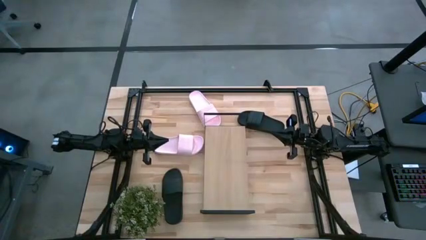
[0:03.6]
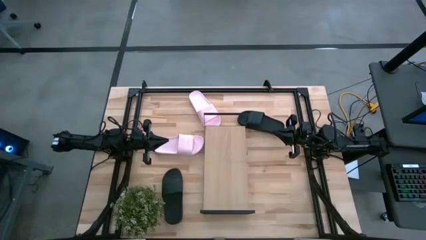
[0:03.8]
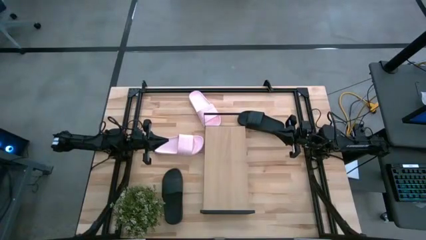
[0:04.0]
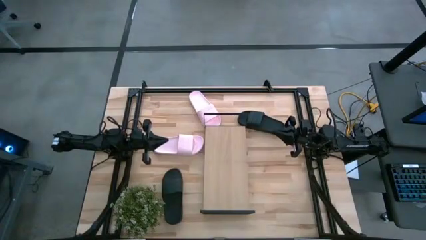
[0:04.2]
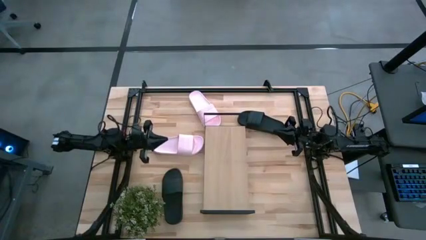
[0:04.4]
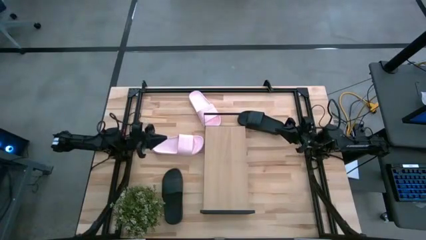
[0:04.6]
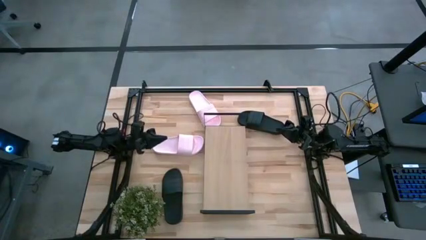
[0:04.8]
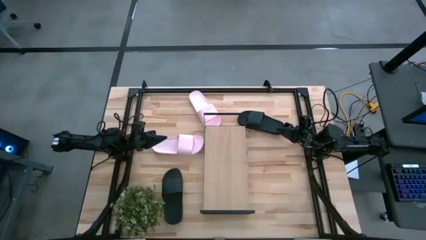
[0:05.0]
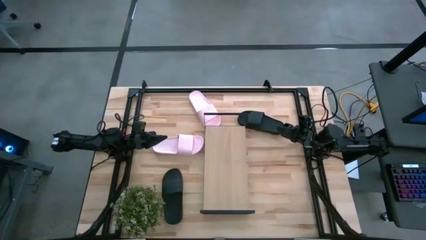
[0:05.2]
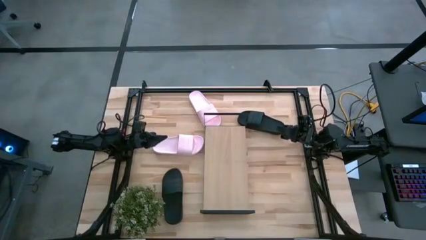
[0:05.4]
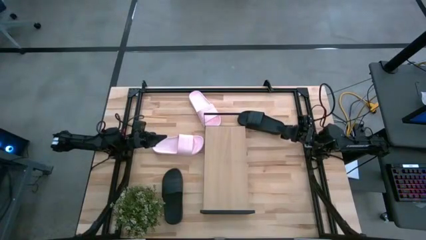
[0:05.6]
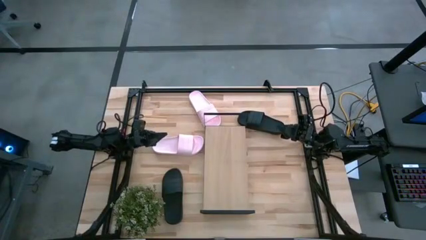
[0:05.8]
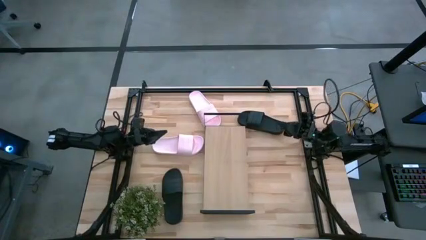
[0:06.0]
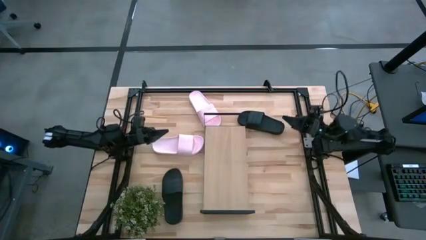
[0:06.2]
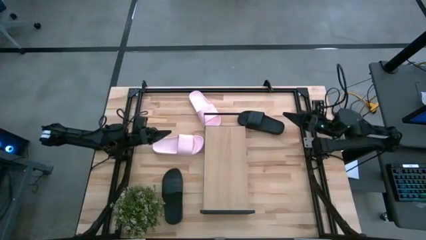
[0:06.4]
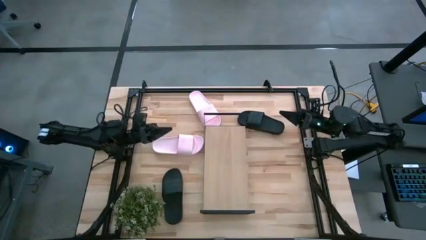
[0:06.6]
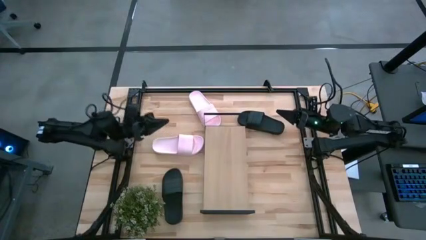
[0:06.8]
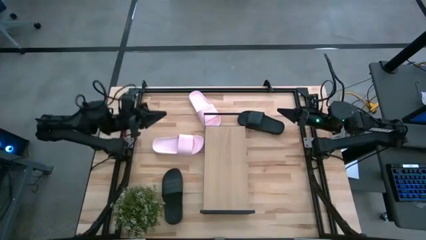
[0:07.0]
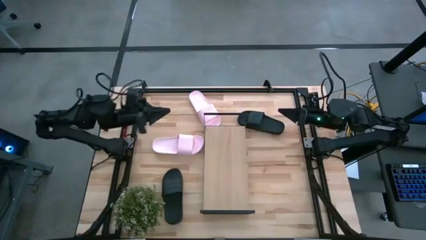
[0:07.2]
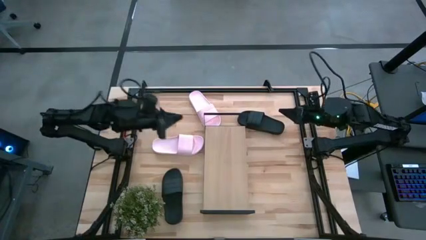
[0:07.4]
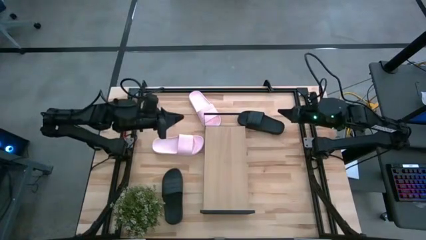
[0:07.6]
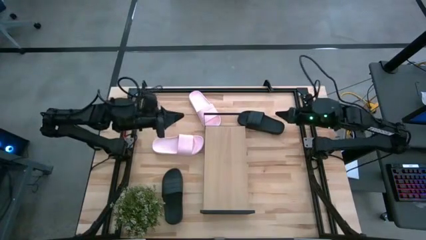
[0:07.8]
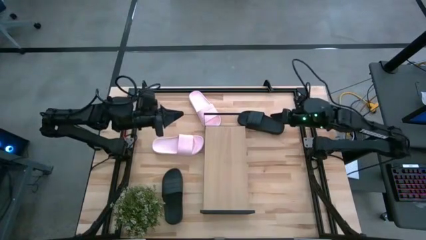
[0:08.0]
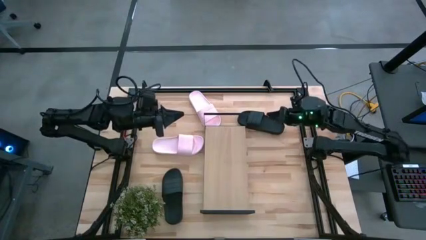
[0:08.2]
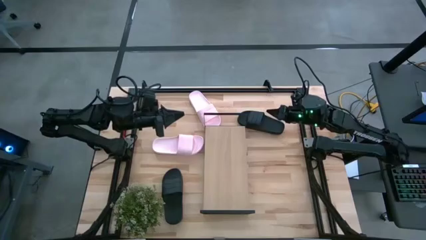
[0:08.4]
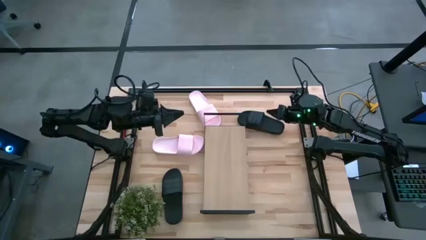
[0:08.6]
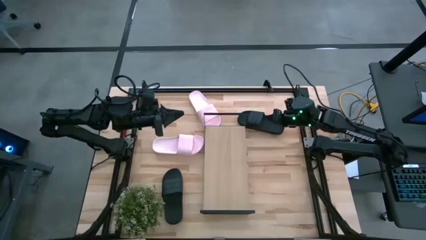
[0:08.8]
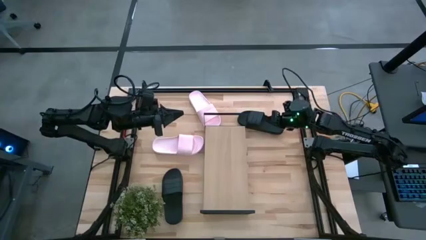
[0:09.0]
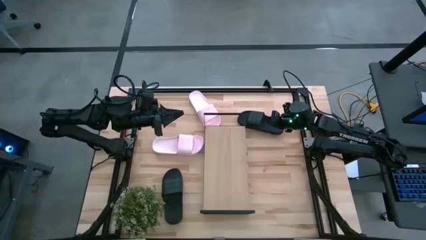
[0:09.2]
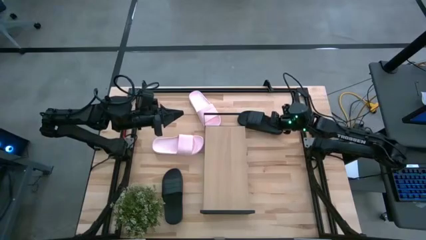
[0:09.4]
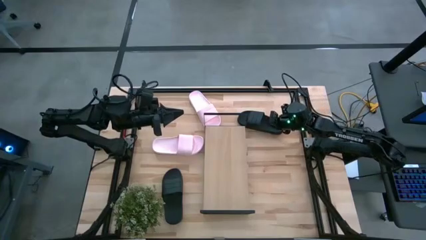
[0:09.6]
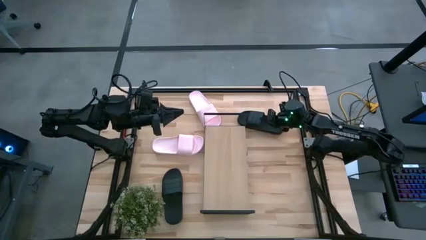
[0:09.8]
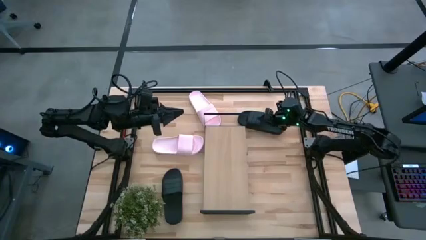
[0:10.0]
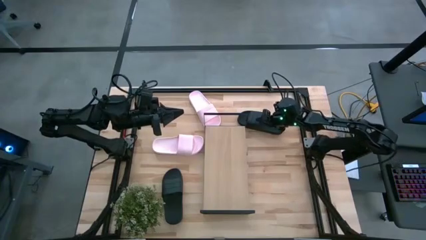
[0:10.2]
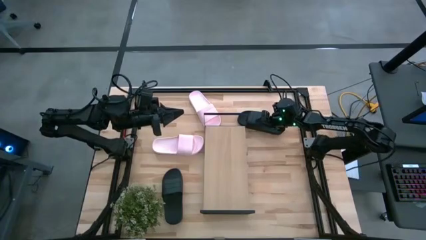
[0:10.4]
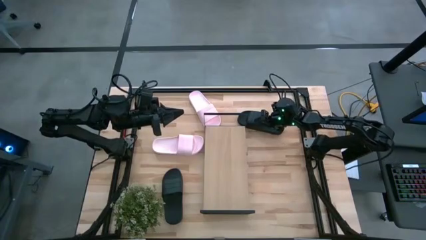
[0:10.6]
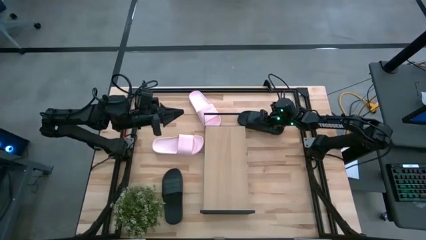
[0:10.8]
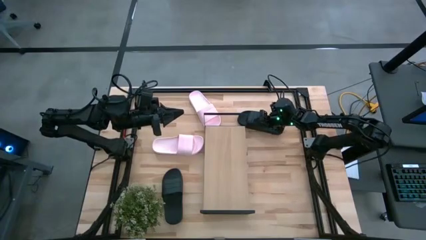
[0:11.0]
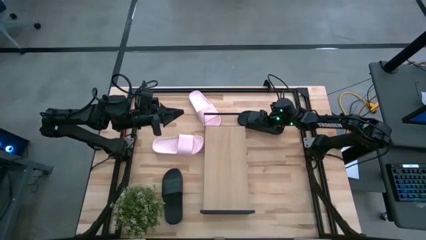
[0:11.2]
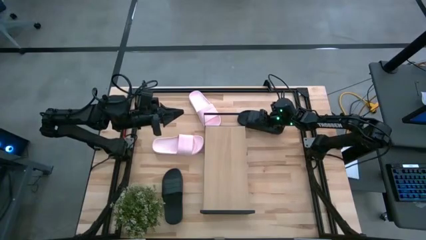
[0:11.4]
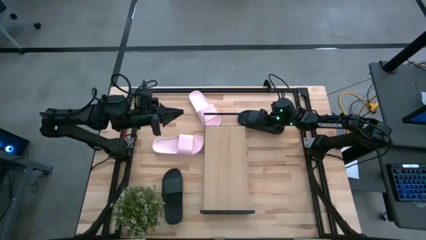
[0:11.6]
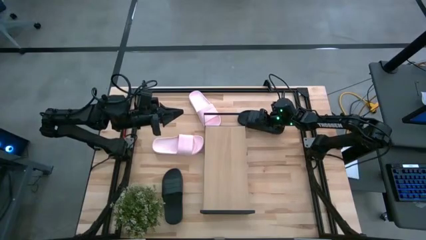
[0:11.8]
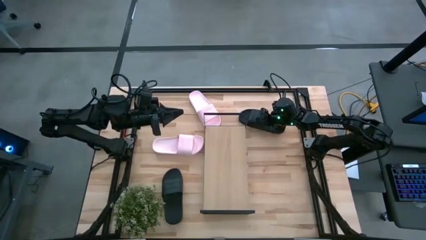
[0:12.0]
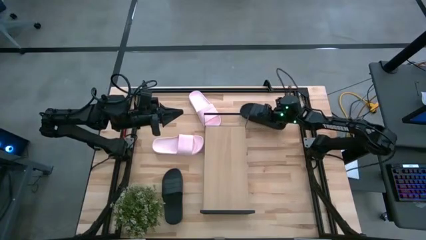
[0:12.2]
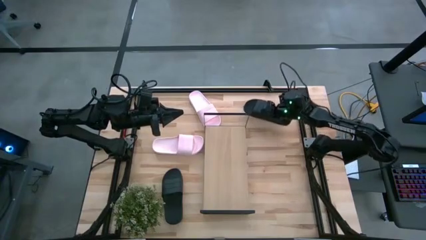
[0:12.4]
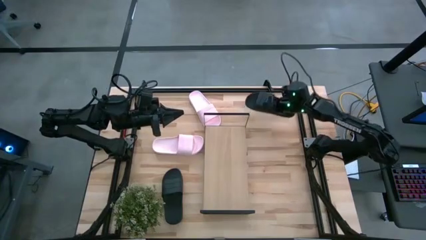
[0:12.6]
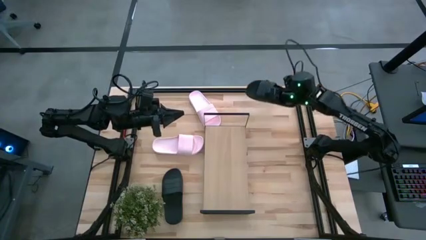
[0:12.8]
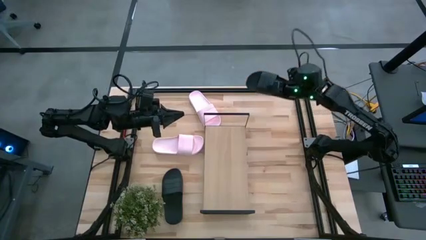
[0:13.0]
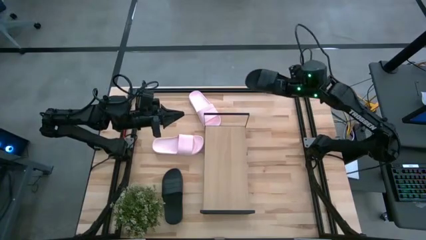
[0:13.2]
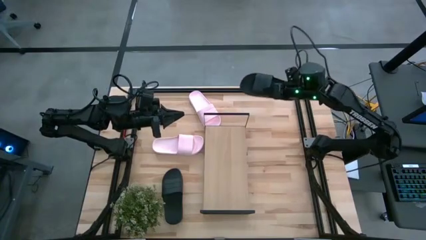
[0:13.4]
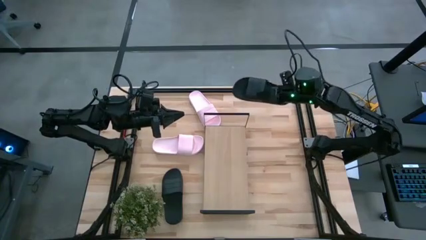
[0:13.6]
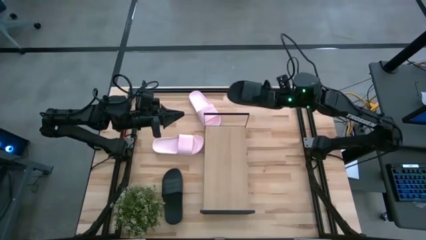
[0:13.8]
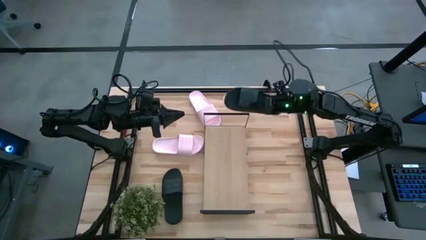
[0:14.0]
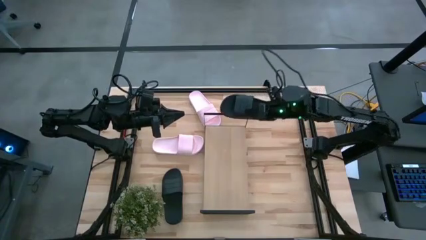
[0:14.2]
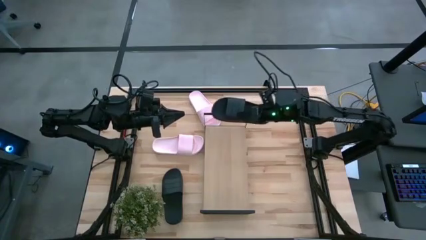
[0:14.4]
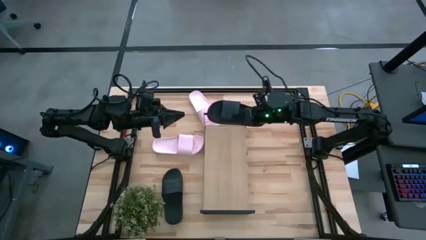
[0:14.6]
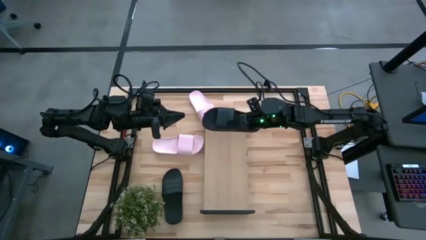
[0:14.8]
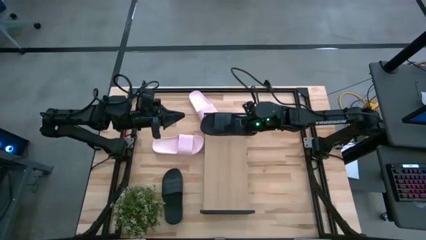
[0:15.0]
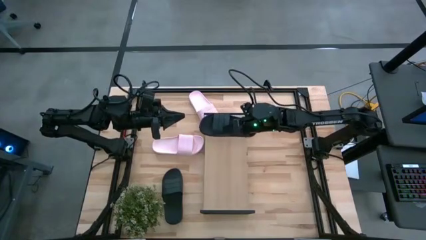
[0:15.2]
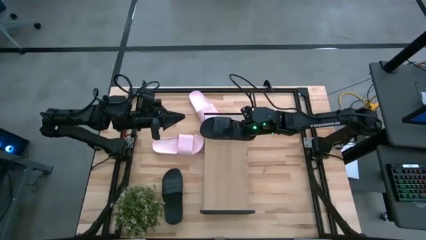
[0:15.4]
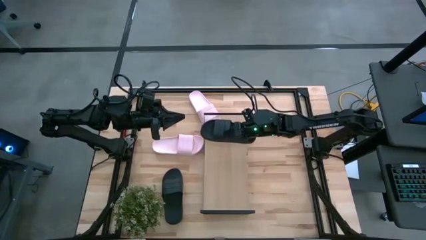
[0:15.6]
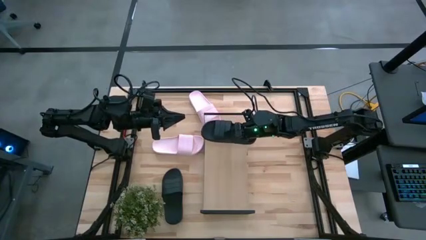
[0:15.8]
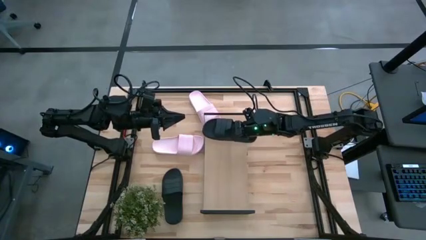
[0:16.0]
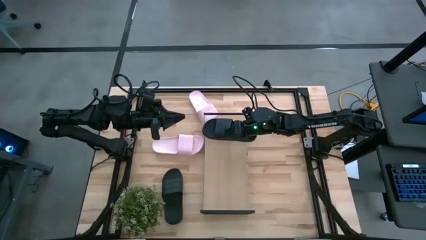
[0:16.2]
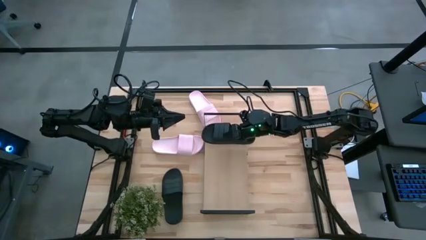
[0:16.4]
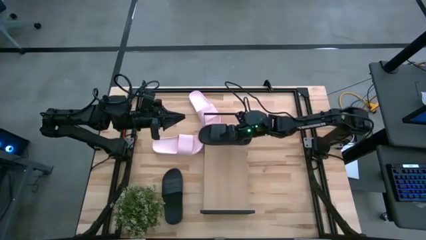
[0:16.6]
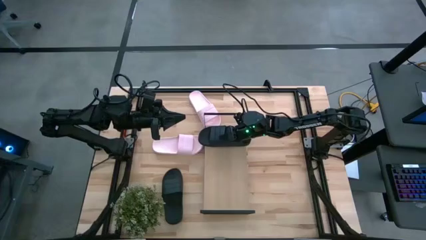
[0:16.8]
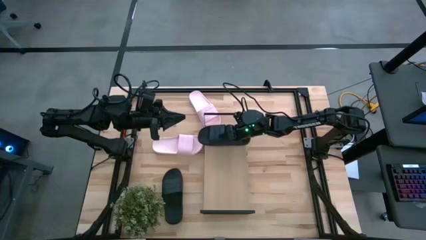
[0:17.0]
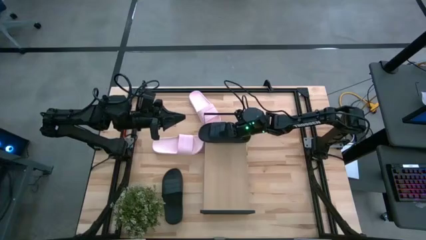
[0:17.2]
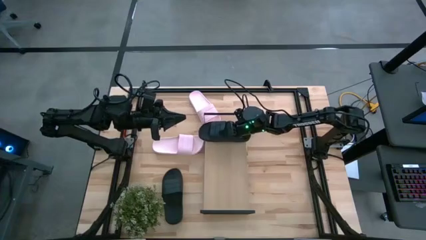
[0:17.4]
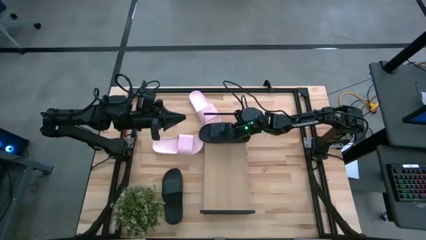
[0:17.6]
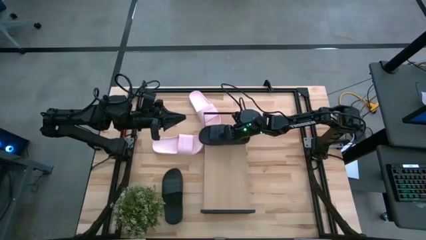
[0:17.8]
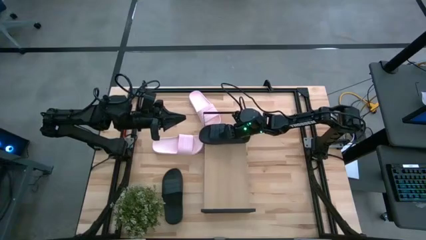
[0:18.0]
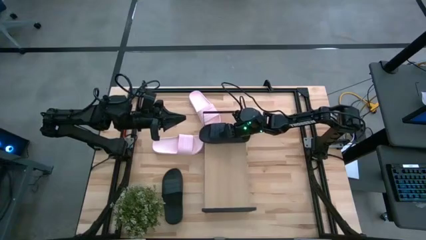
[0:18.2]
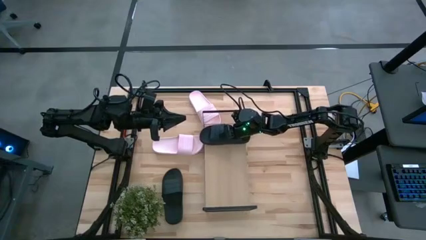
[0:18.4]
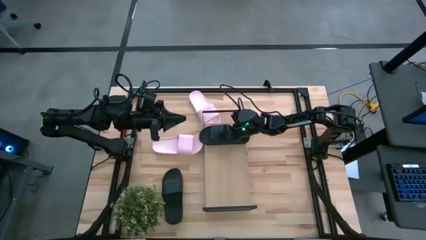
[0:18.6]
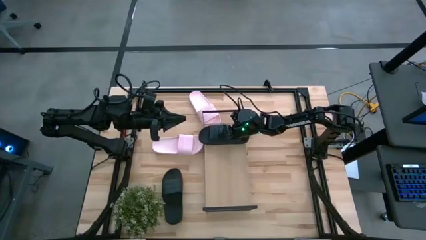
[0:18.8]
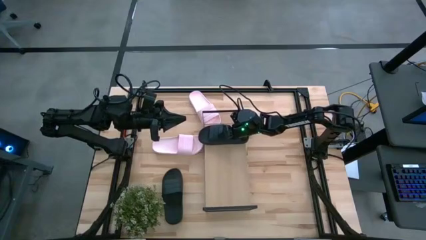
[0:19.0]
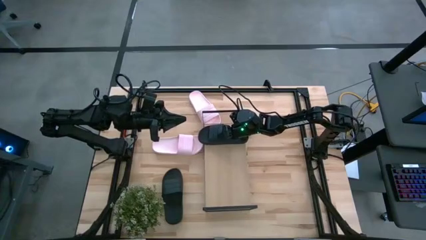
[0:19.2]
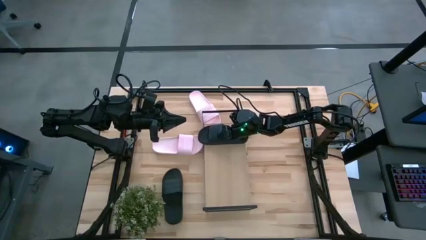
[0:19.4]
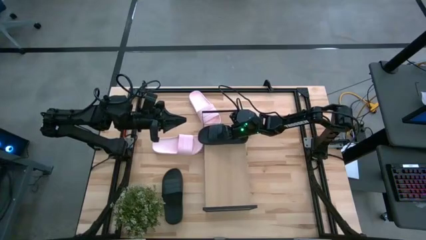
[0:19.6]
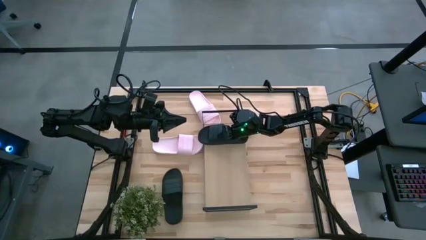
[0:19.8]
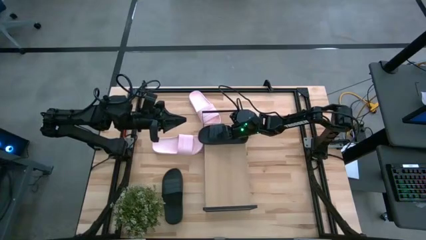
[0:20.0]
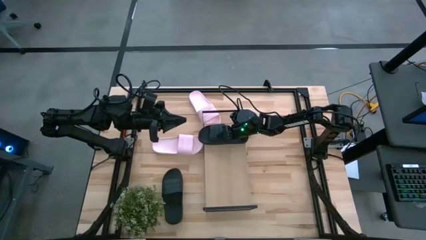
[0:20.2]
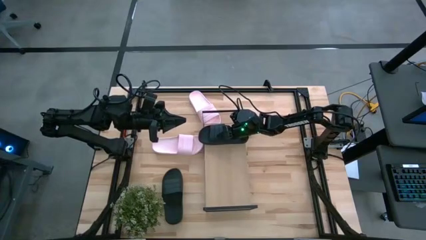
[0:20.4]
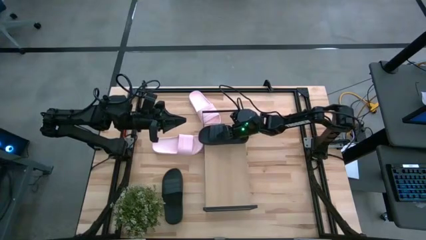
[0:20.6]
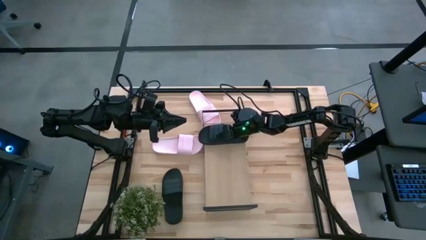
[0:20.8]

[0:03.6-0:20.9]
Task: Pick and place slides into the shelf
Put the top black slide on the shelf
